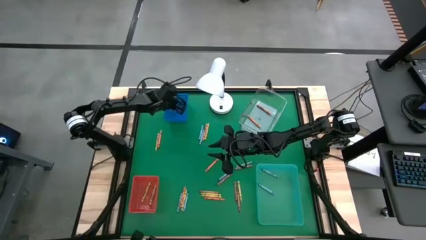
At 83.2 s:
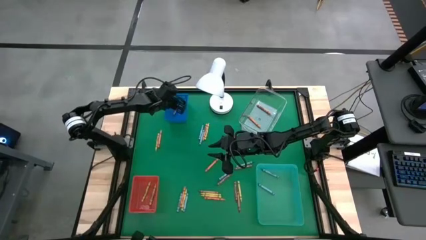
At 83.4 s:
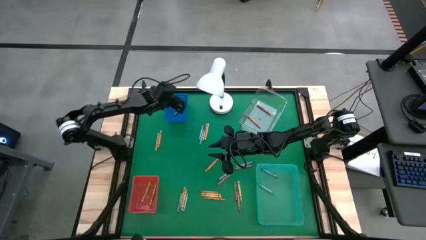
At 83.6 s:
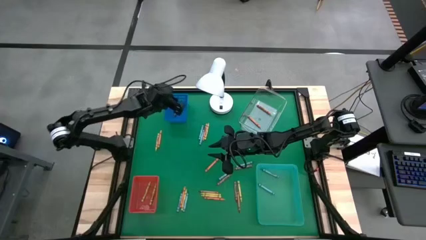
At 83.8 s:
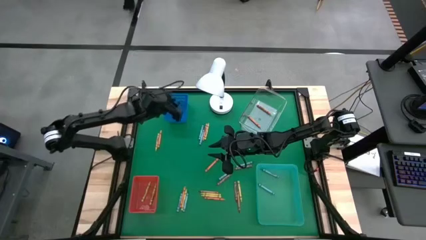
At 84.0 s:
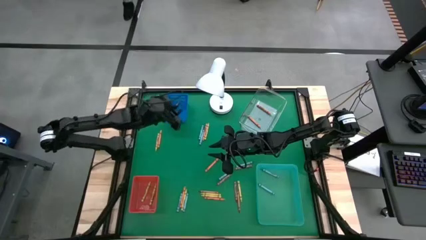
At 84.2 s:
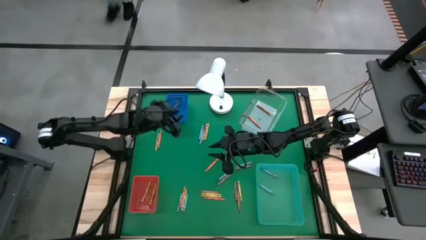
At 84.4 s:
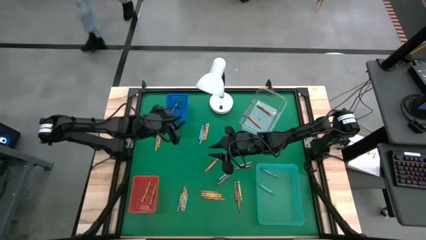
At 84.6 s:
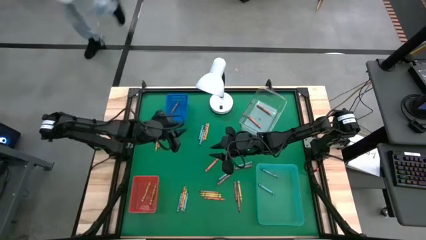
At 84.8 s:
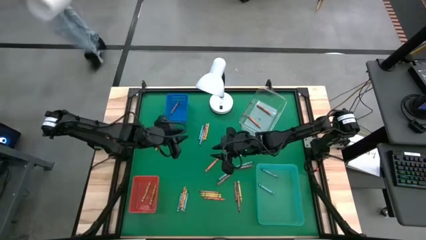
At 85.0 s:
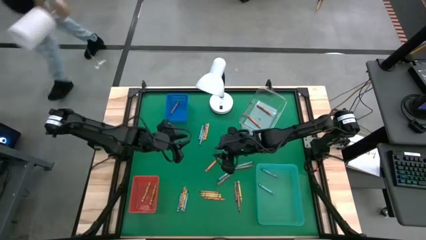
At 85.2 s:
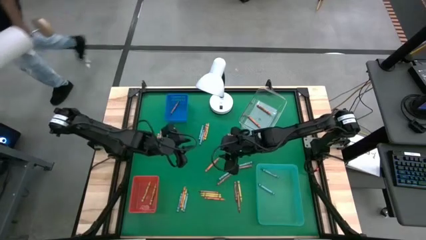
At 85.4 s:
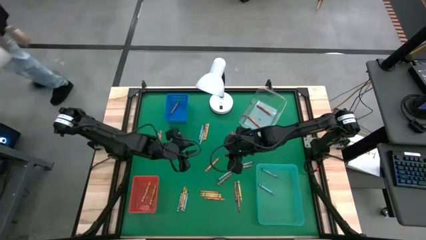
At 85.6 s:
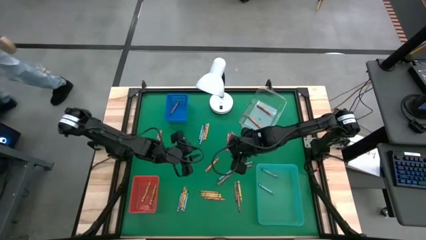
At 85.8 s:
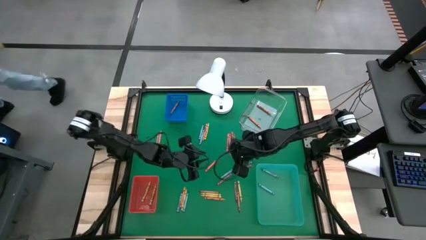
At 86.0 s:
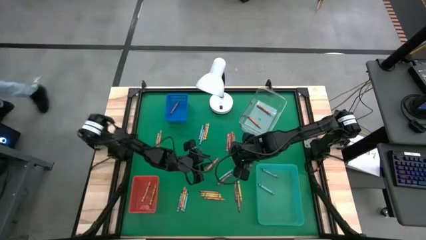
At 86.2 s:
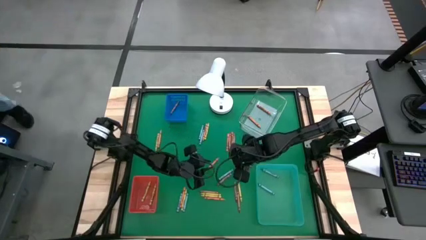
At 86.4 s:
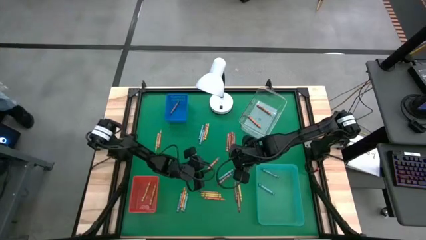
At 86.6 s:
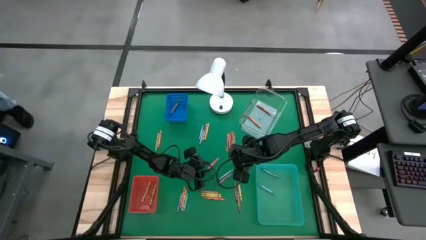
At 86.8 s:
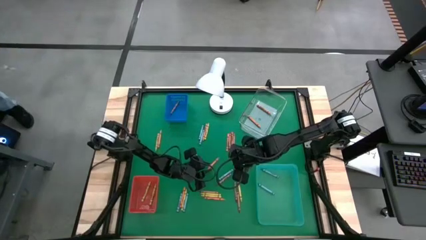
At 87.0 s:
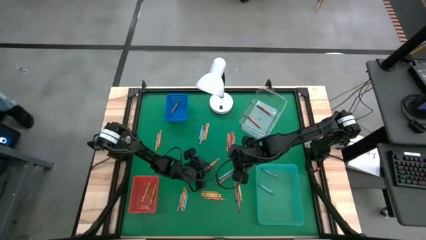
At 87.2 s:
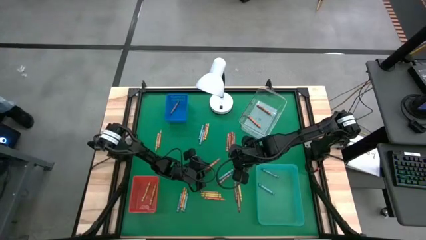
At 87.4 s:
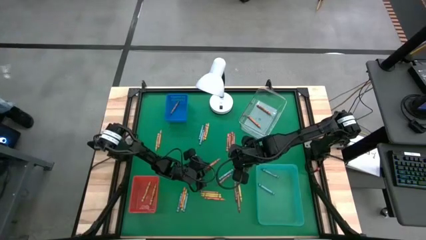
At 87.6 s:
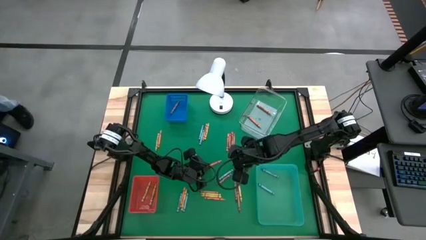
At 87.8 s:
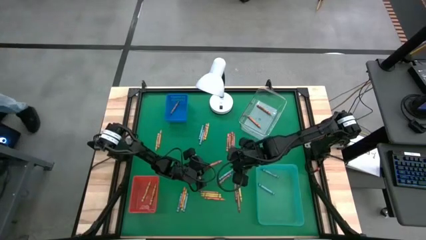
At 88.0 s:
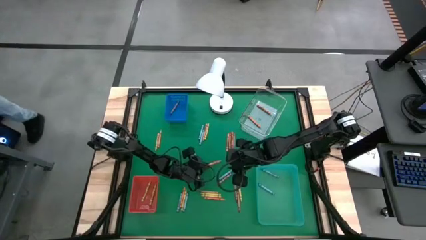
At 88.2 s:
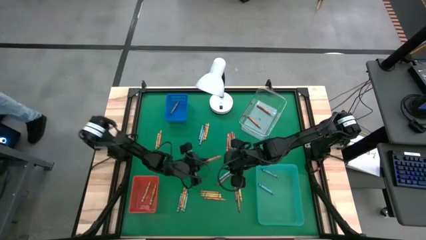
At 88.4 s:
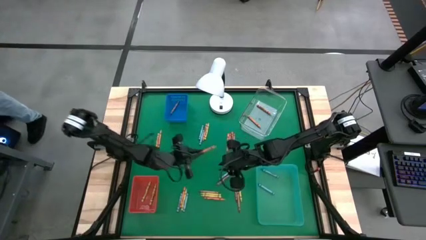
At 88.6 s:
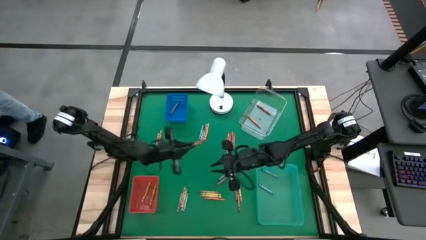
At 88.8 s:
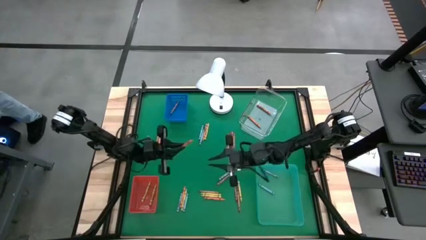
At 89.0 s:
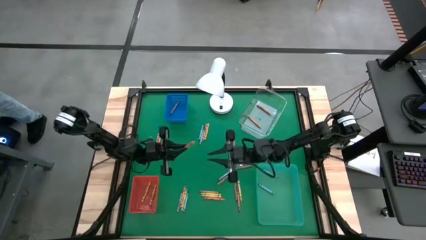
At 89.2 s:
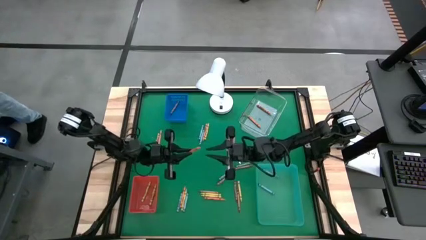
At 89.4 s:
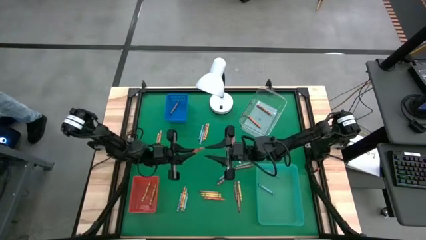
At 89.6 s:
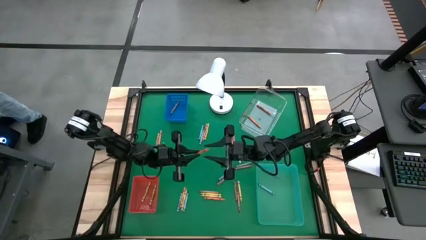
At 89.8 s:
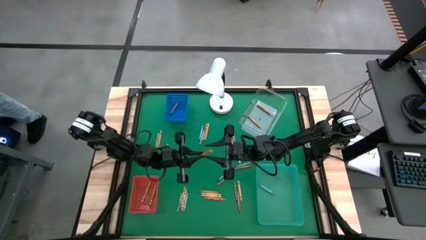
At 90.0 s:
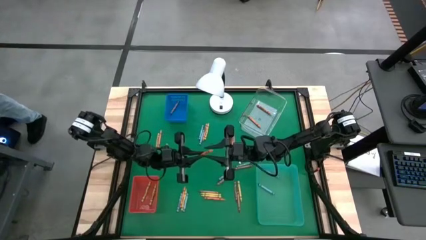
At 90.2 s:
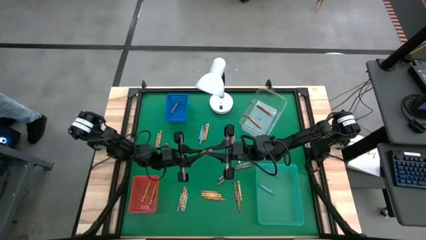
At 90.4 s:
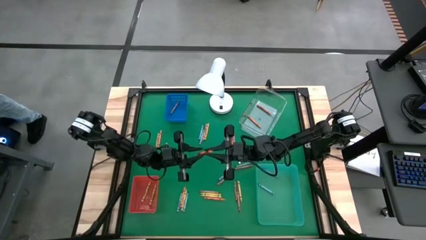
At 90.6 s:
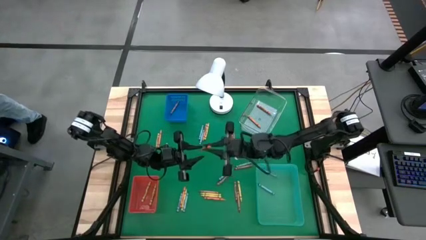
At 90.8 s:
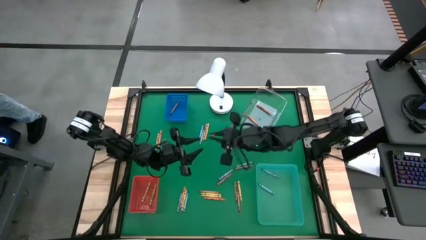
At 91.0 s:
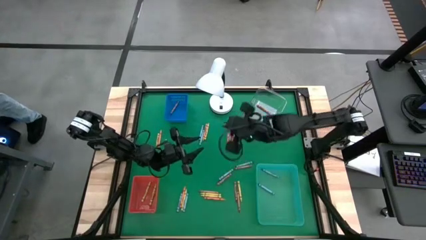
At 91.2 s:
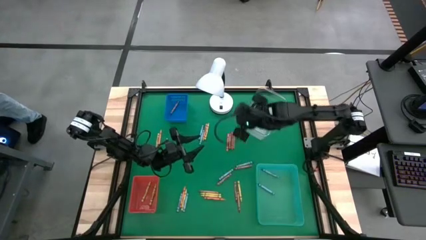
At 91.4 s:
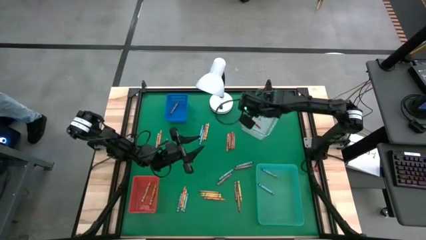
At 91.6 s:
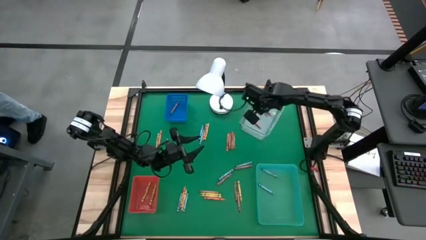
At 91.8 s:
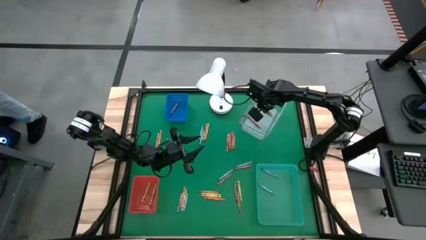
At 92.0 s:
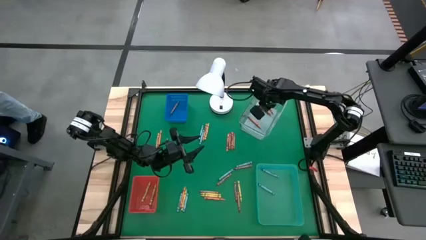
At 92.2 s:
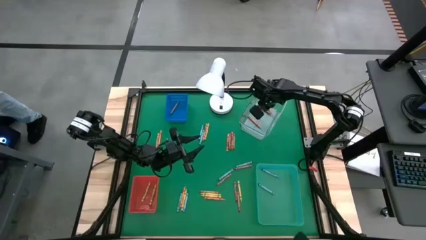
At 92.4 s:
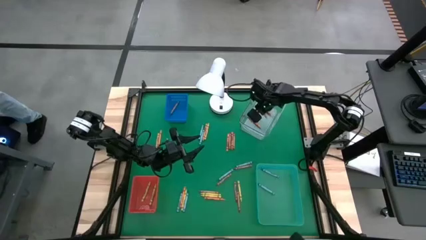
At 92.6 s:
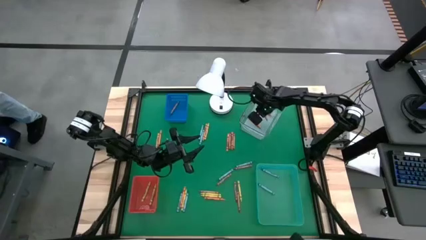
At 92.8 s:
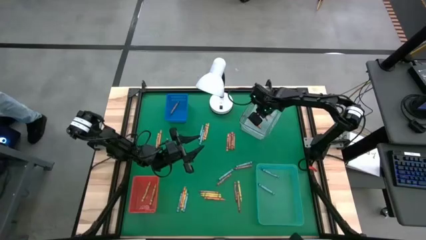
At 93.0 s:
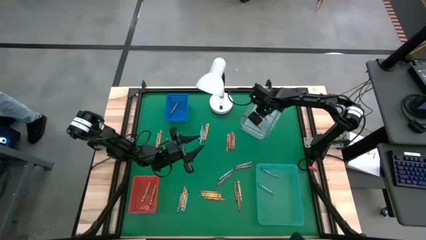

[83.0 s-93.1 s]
Task: Sort crayons
Put the orange crayon into the transparent bin

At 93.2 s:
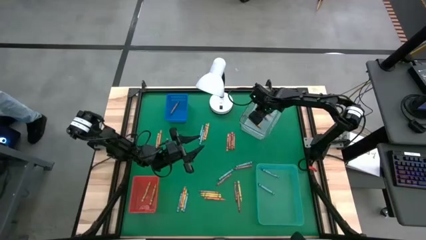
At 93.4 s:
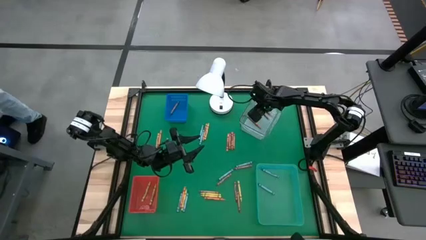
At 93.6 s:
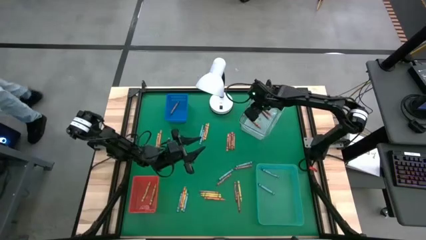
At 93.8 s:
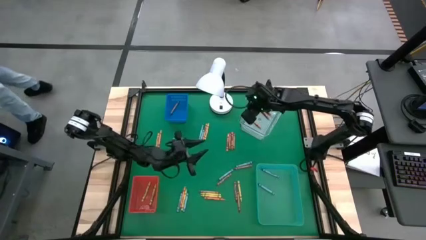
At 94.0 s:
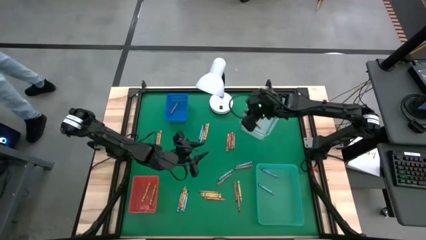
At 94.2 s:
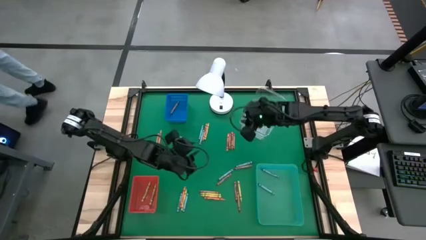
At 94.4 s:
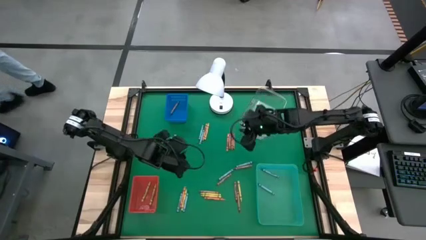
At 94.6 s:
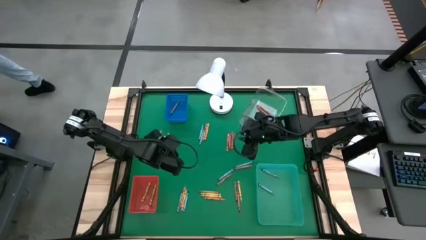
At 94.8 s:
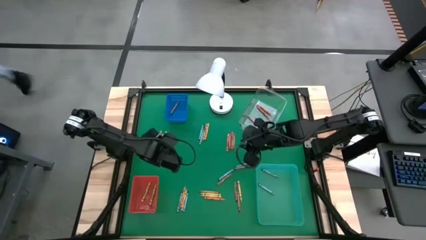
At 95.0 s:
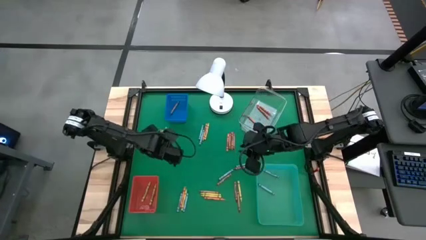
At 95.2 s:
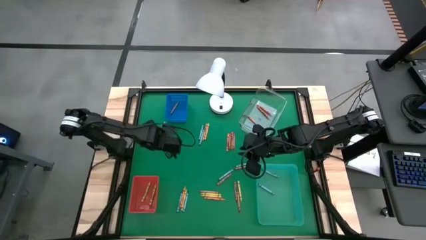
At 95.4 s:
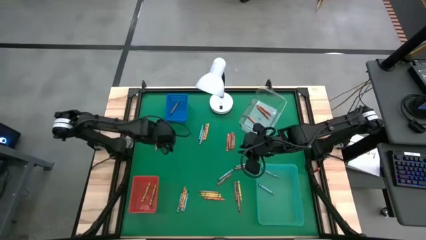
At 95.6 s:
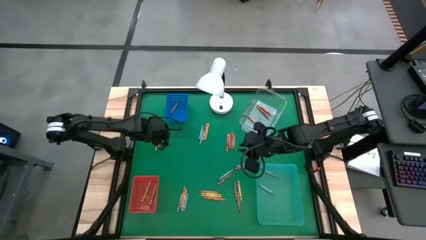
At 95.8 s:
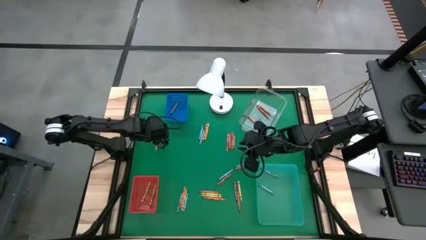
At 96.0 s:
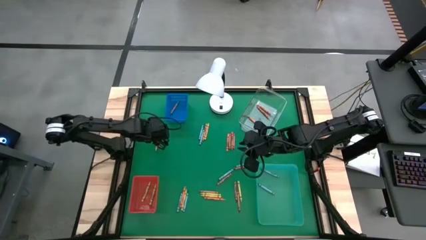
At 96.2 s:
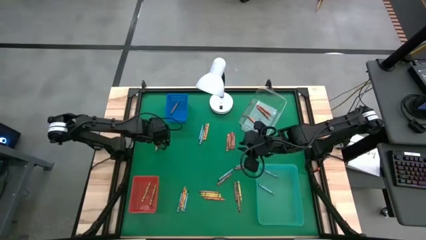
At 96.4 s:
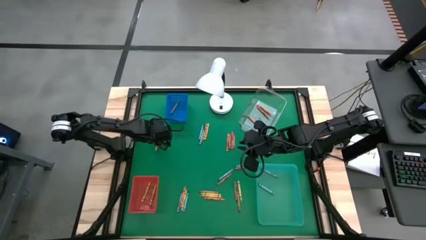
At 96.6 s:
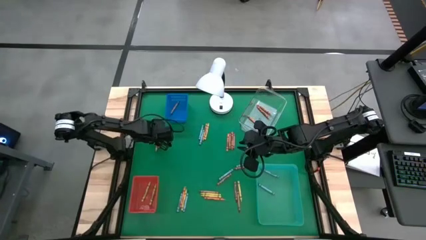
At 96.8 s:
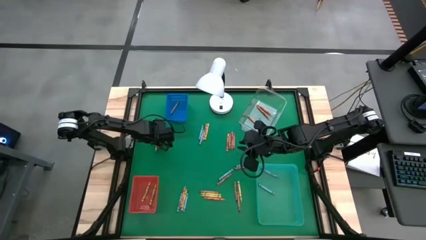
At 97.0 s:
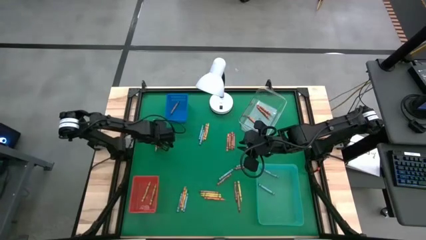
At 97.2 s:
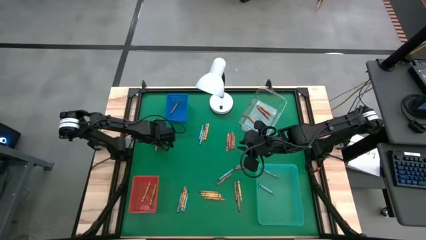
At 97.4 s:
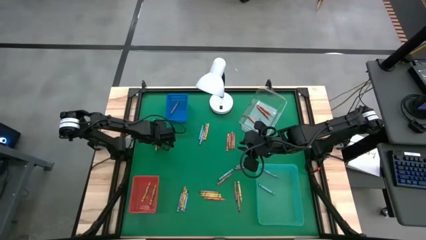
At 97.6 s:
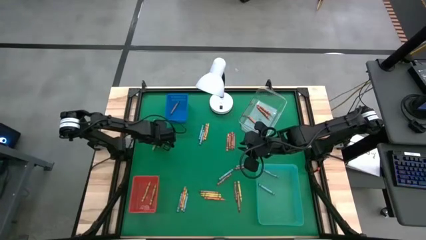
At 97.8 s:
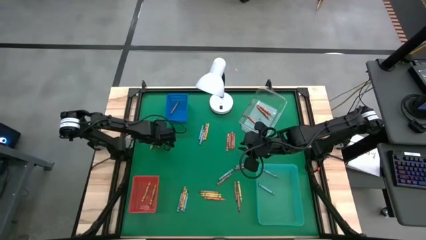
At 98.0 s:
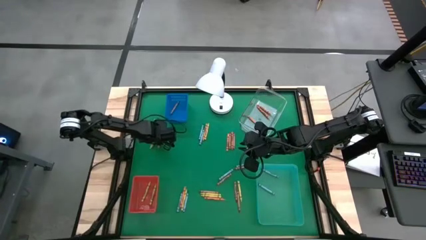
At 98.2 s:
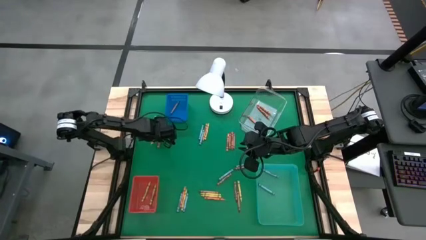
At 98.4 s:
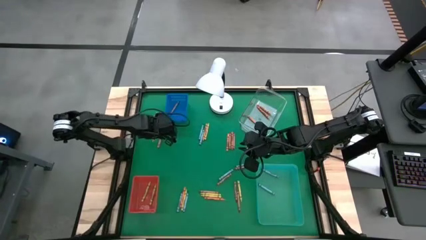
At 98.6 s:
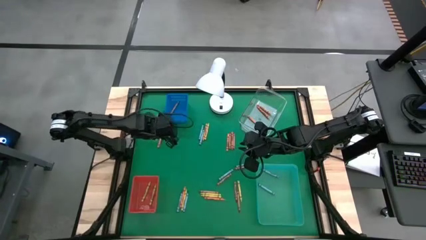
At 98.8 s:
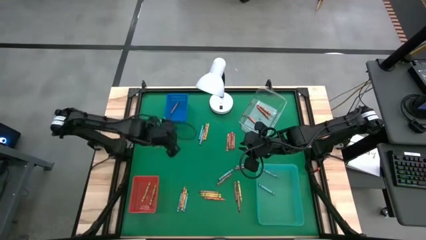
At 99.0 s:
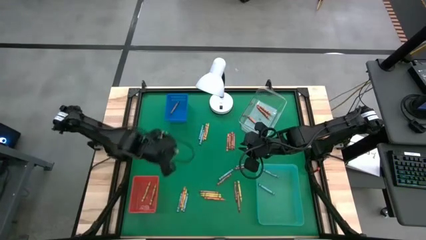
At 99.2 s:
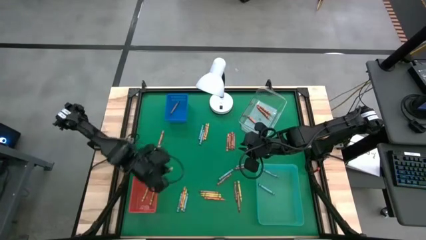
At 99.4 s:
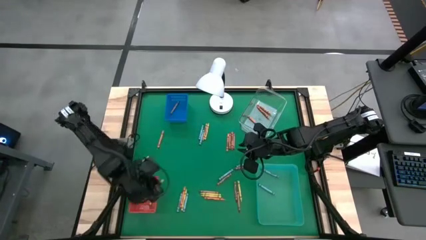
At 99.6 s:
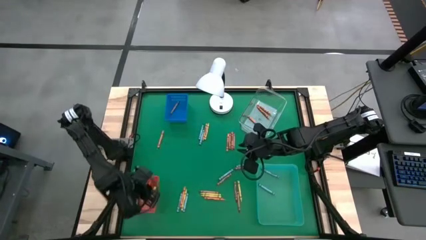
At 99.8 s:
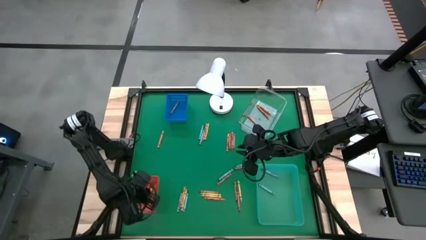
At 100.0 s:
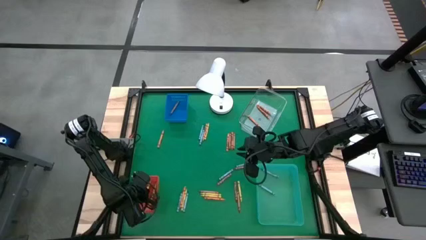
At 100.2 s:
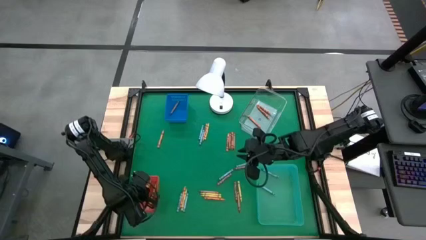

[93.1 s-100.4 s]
Put the yellow crayon into the red bin
